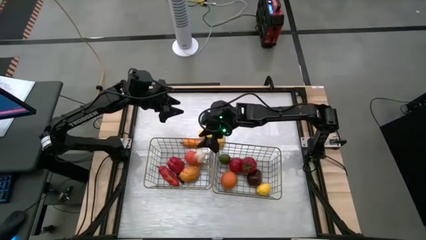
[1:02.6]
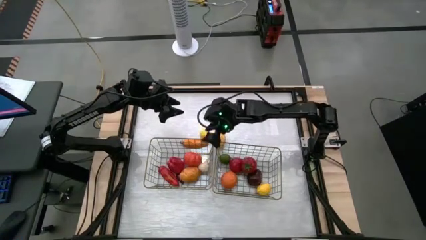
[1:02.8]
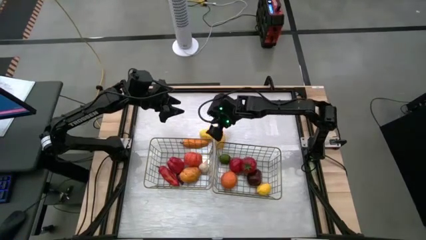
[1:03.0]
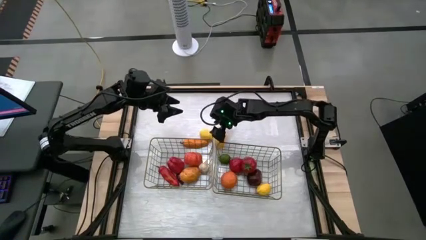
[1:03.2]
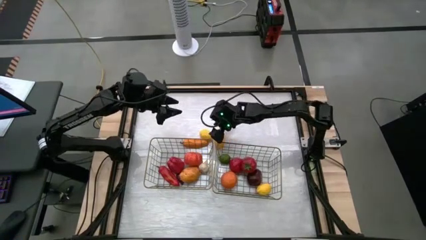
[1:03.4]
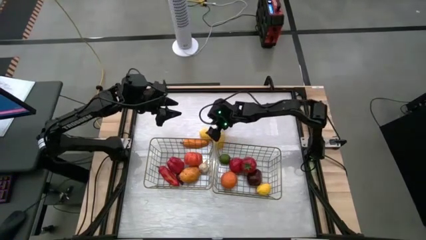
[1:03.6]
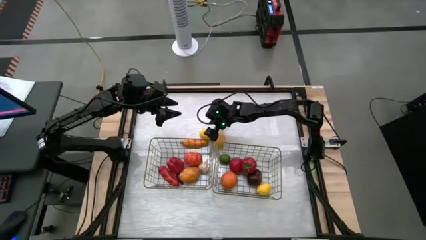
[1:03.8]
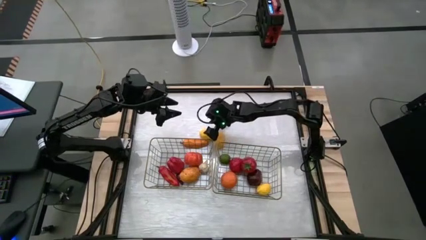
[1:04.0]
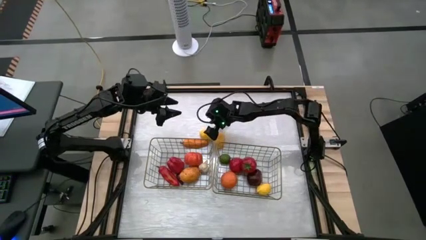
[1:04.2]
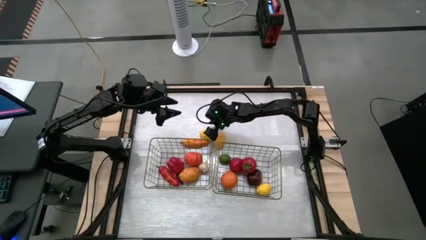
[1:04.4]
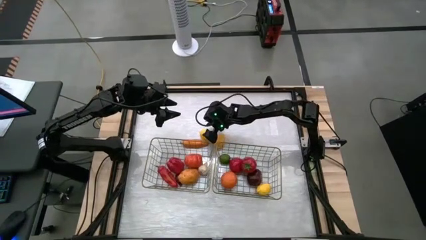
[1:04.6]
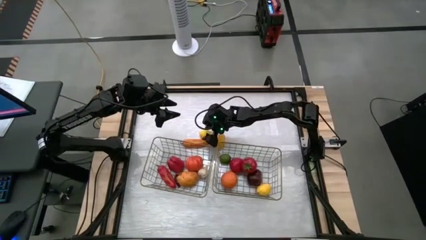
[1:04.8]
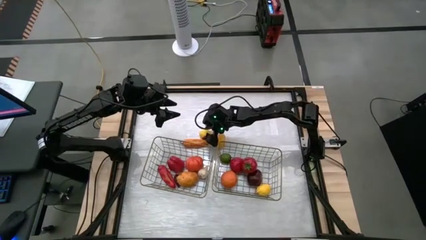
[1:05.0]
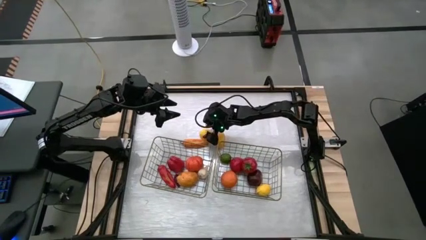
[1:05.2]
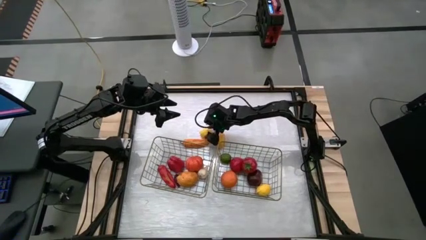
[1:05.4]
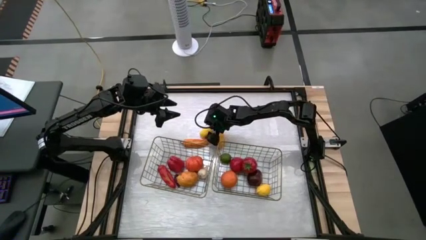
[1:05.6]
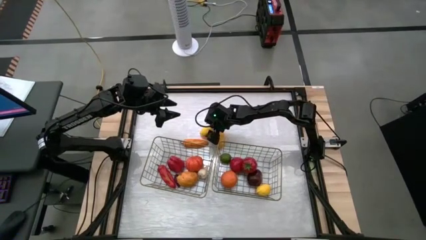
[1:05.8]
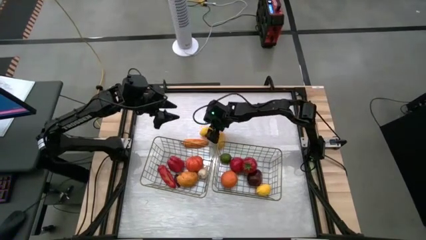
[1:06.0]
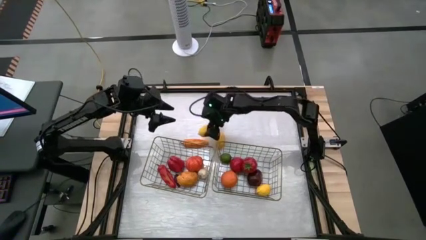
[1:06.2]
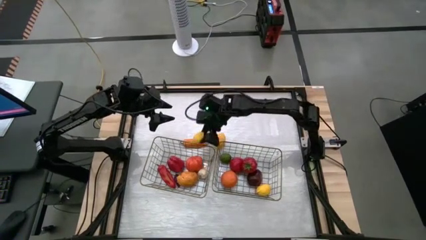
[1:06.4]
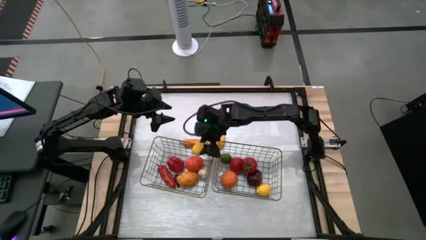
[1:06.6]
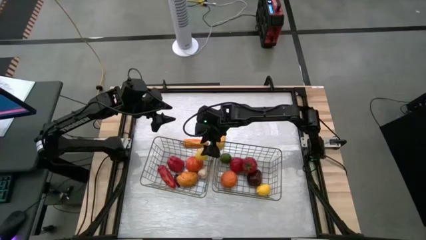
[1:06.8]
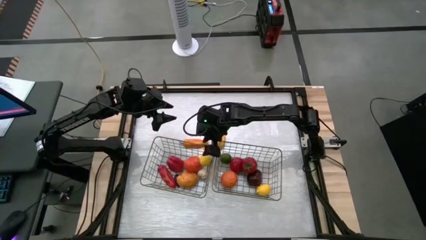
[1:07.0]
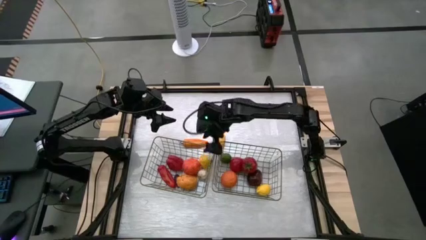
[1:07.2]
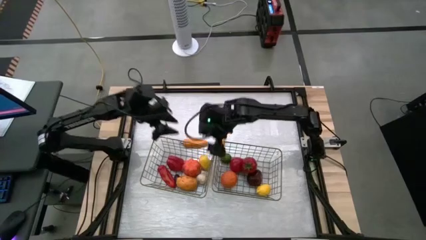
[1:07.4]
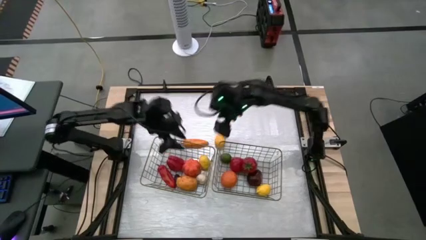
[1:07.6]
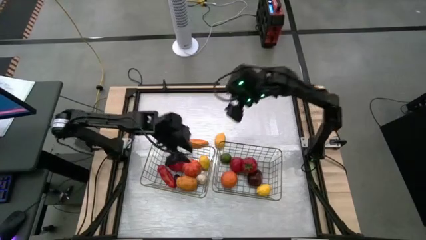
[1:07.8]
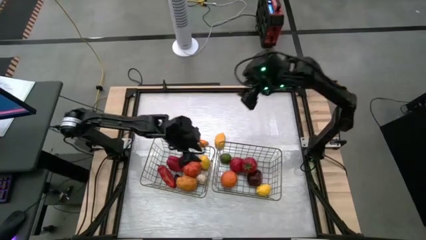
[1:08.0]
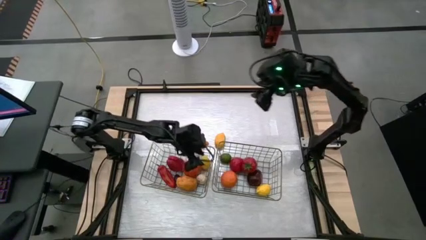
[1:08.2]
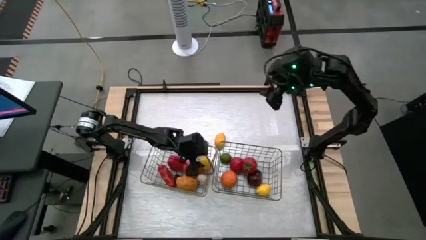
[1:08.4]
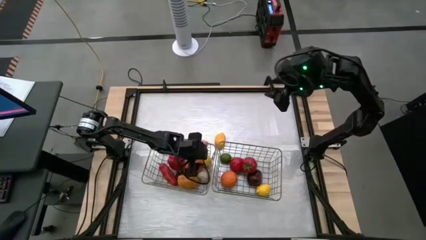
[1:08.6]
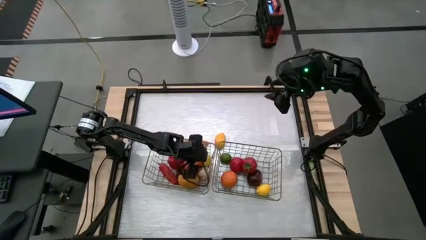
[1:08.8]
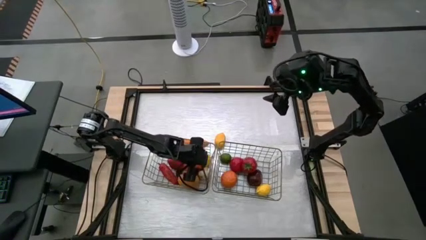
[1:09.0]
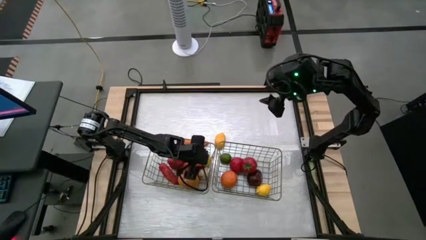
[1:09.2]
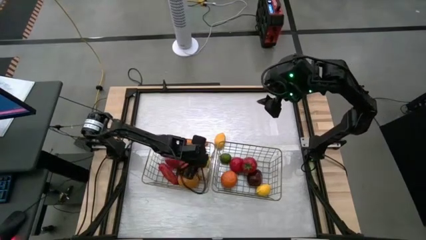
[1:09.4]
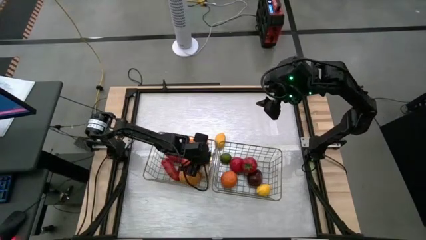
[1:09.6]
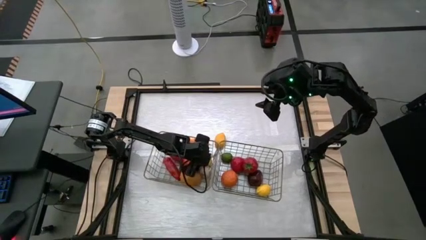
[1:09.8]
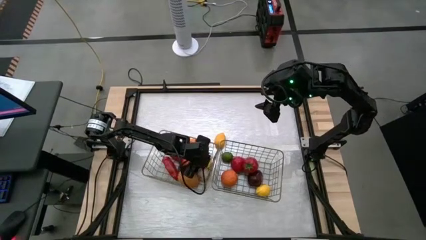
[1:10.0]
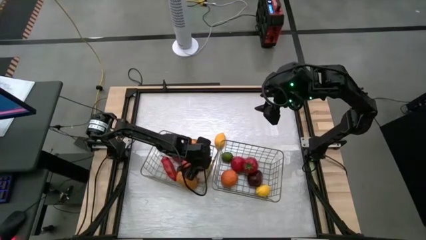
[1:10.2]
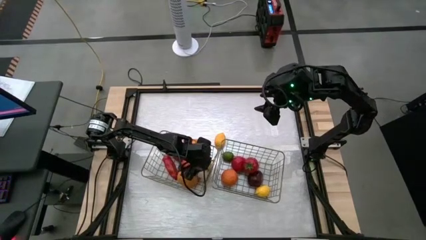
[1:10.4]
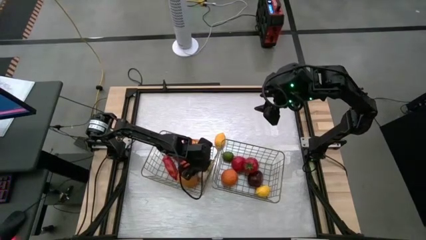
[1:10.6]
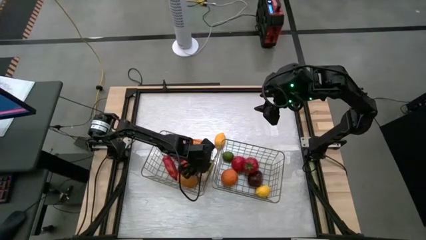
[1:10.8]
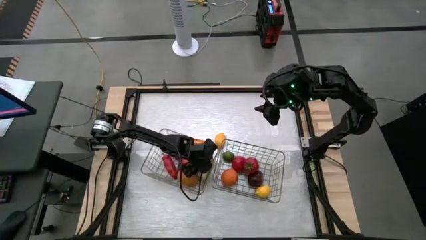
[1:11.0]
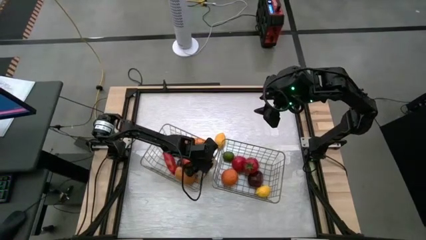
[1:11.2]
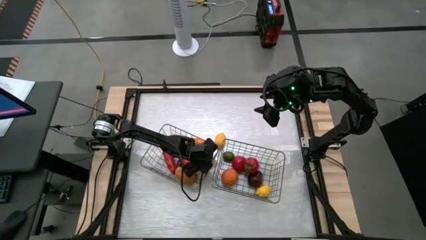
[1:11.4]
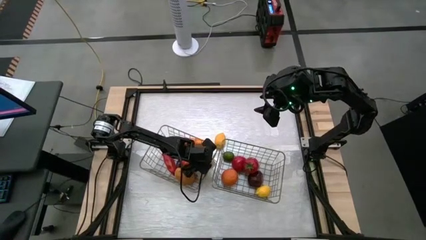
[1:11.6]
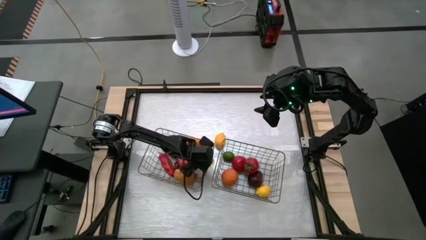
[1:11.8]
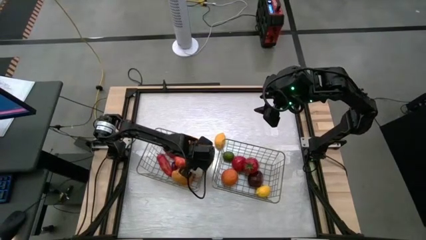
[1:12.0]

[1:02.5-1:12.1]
Task: Sort produce into baskets
Put the left lemon into the left wire basket

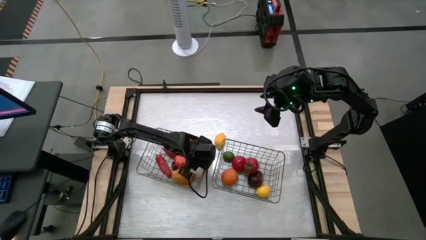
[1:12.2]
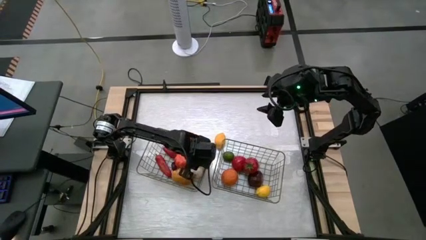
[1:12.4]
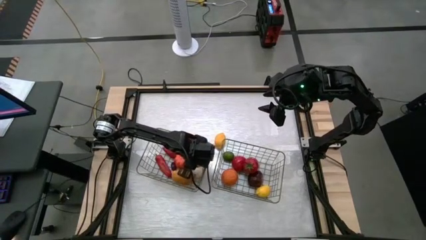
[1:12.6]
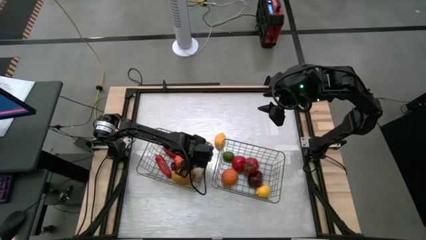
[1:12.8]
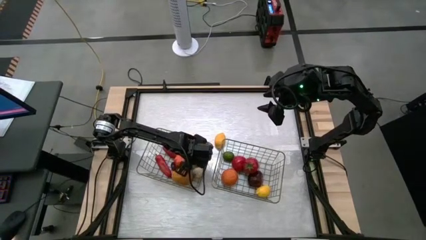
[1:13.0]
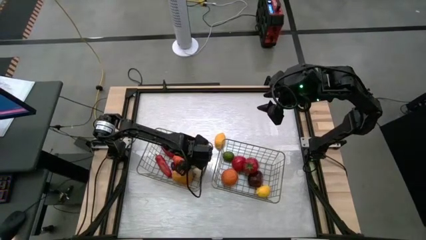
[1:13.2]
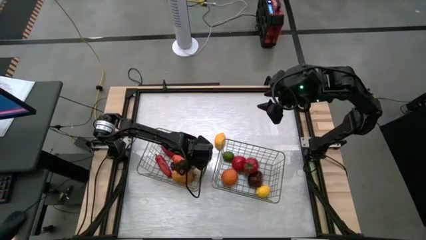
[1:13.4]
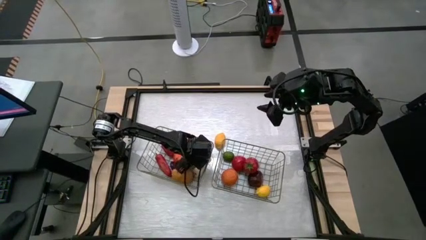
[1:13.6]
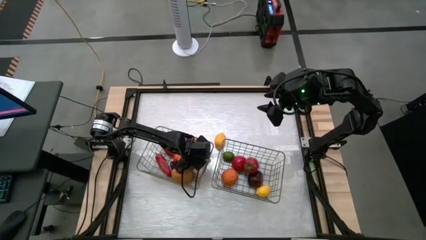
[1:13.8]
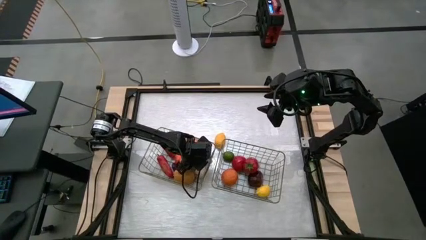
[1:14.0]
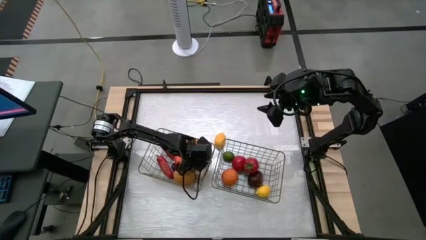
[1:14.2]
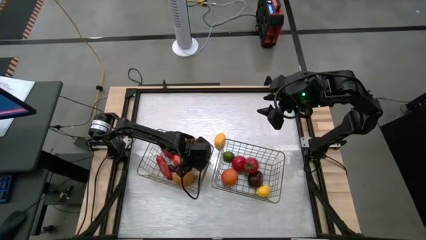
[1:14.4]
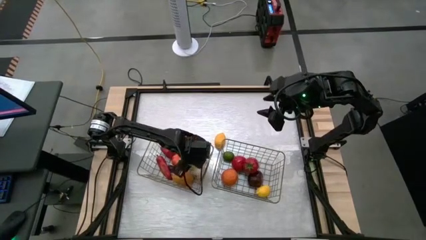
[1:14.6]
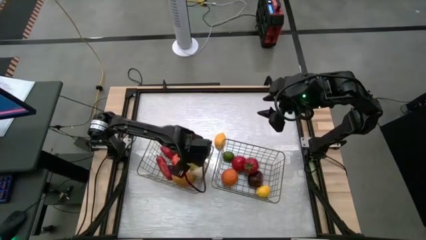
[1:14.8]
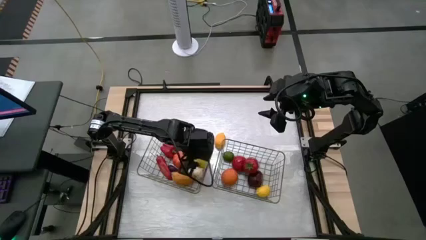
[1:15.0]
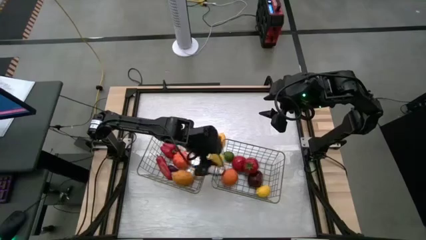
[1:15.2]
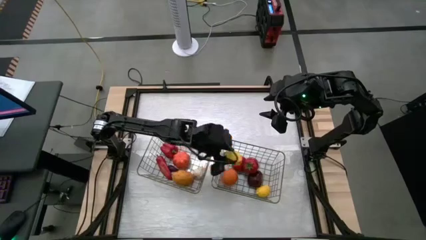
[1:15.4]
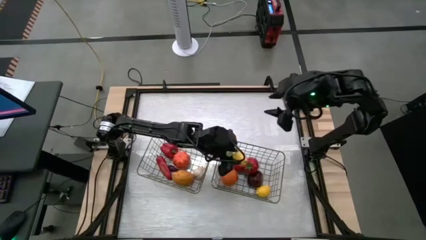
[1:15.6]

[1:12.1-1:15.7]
Put the left lemon into the right wire basket

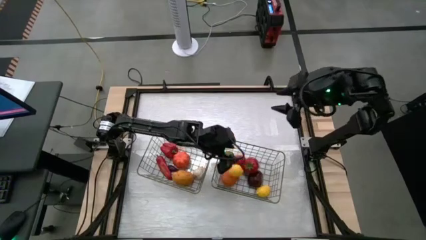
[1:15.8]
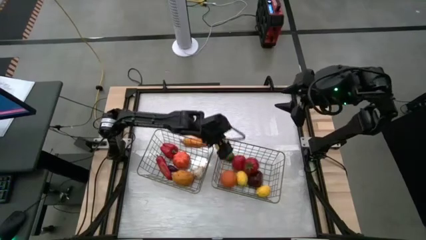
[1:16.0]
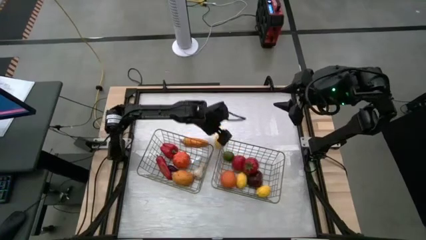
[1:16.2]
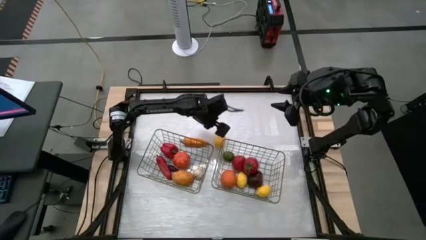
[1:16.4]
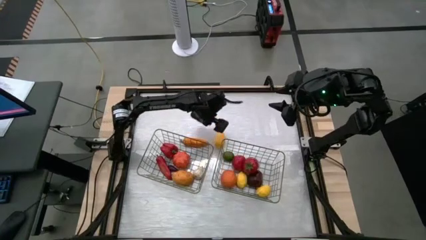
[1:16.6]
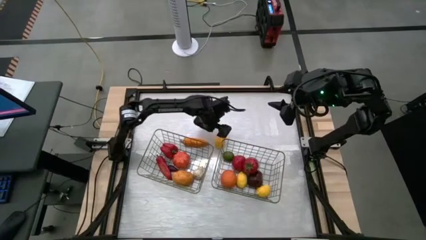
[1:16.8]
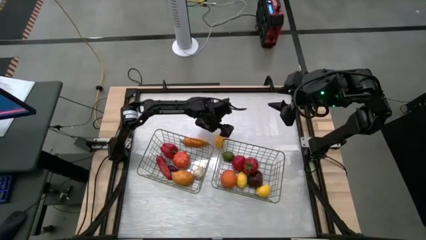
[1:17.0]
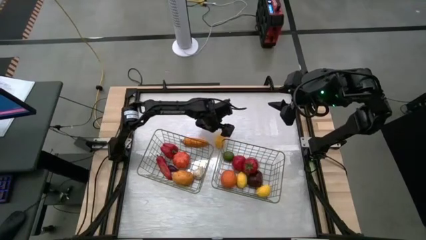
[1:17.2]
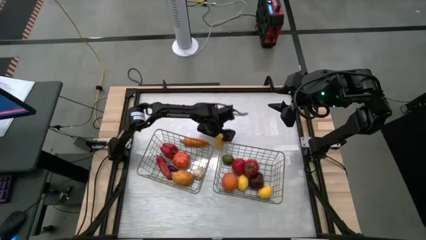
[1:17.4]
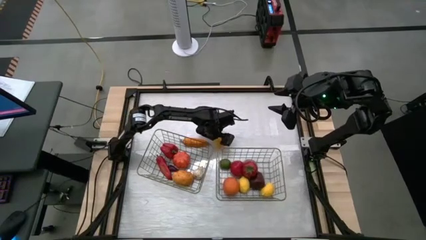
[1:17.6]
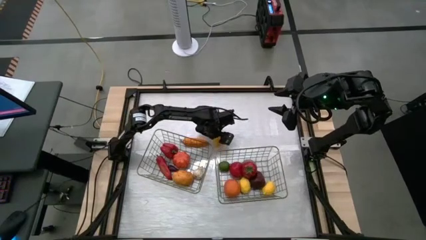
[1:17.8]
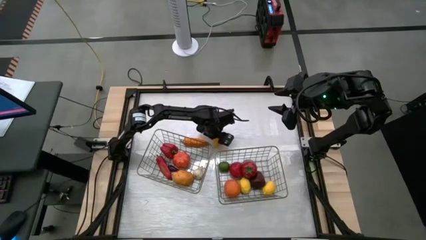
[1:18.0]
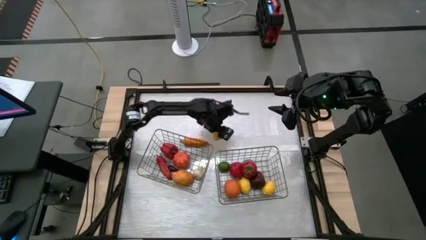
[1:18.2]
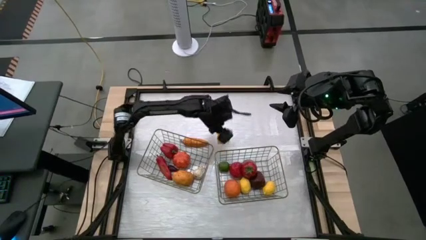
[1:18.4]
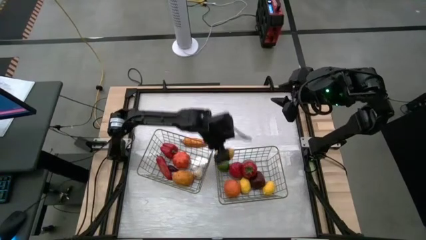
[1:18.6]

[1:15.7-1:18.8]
Put the lemon into the right wire basket
